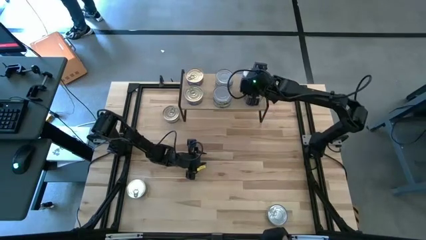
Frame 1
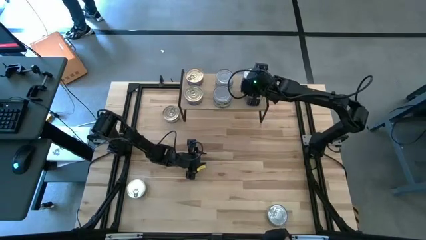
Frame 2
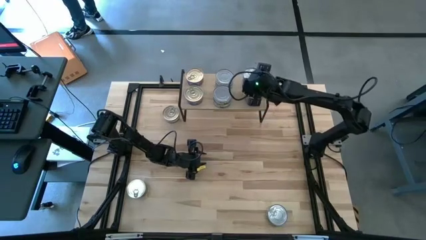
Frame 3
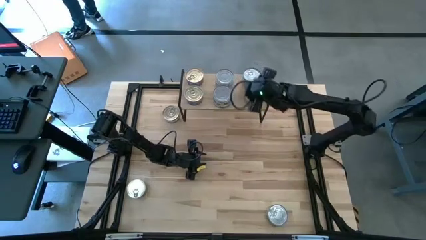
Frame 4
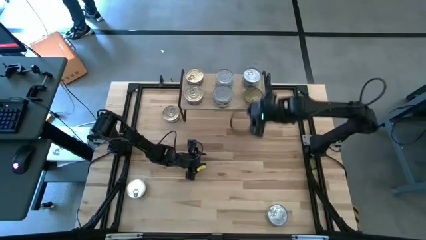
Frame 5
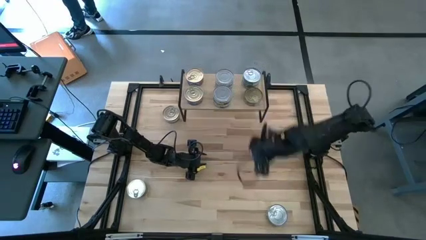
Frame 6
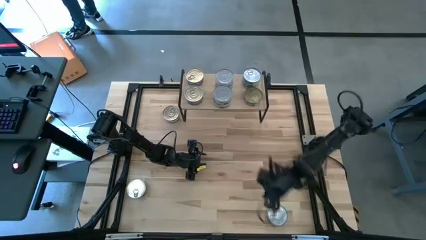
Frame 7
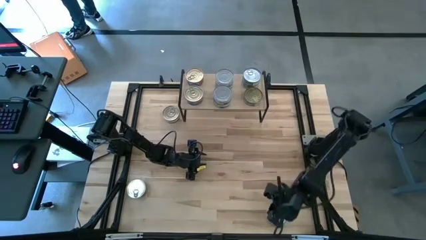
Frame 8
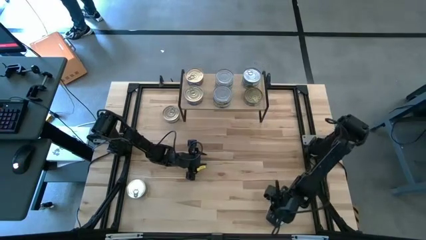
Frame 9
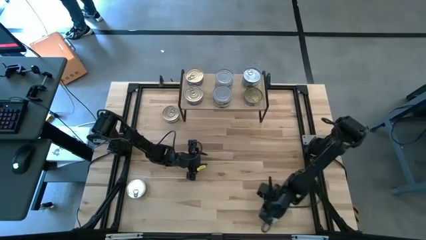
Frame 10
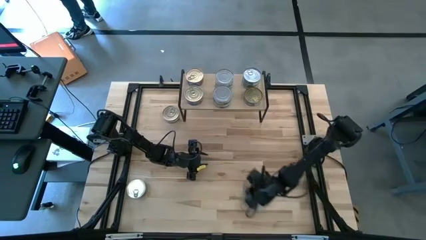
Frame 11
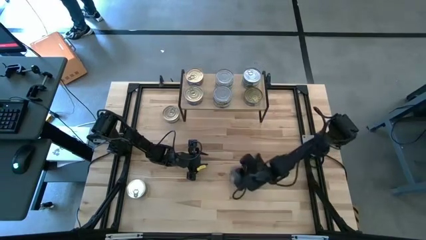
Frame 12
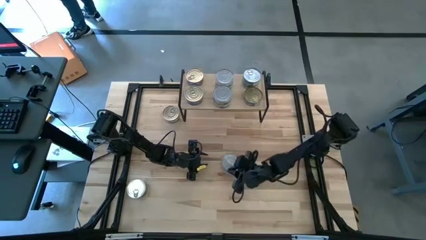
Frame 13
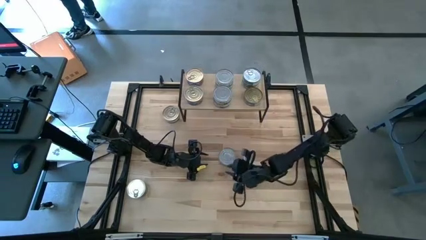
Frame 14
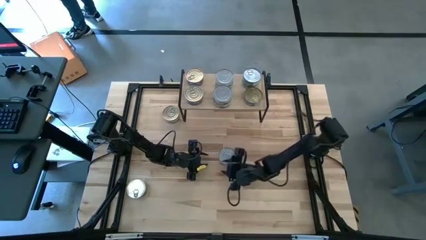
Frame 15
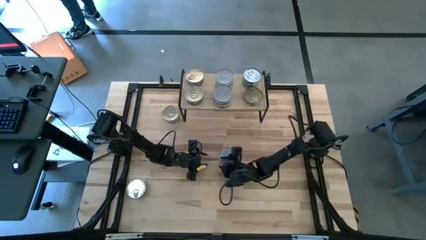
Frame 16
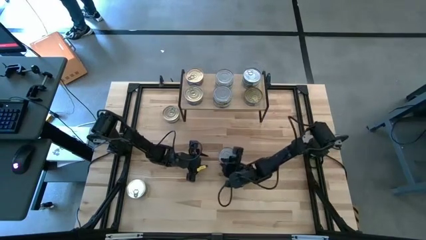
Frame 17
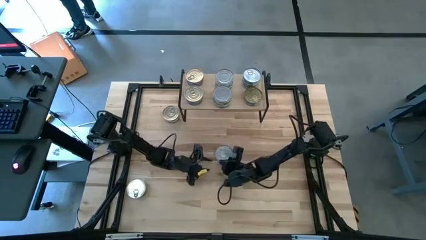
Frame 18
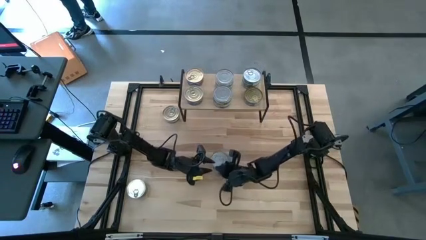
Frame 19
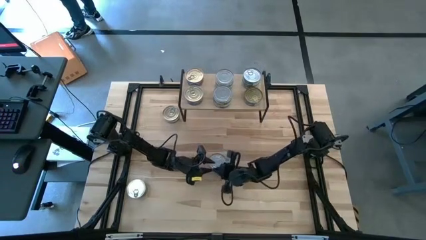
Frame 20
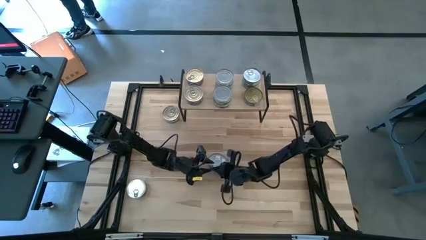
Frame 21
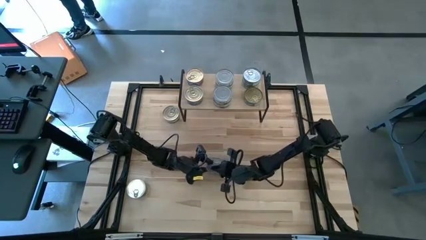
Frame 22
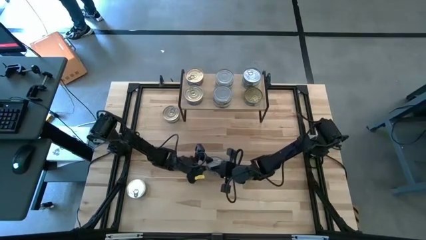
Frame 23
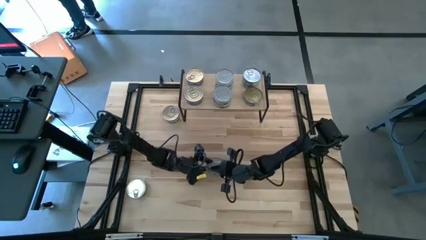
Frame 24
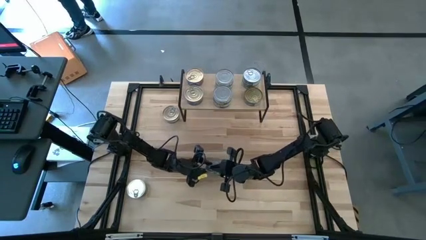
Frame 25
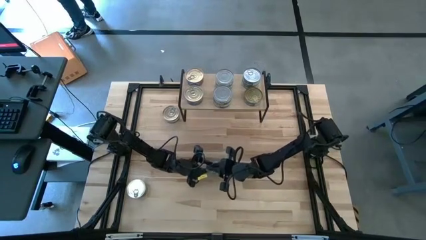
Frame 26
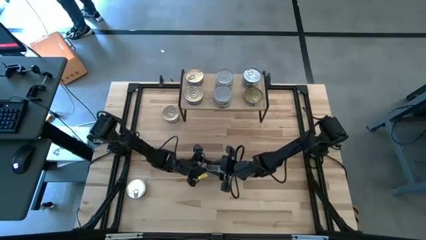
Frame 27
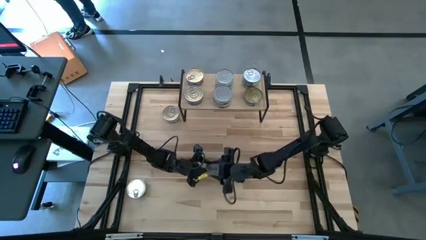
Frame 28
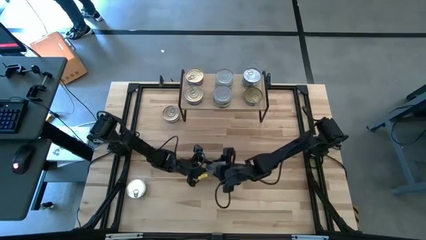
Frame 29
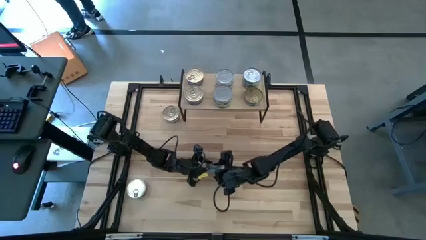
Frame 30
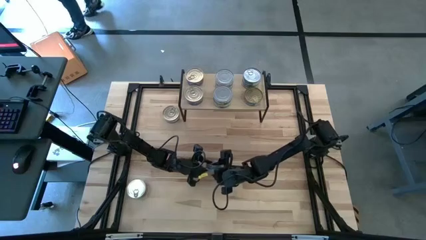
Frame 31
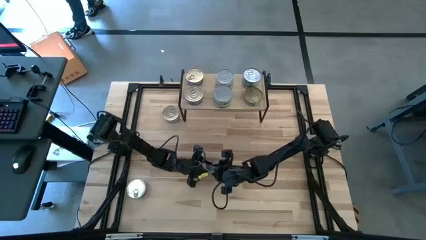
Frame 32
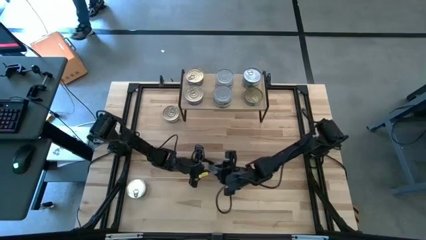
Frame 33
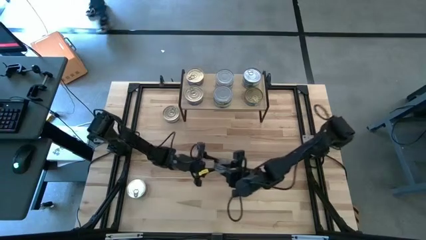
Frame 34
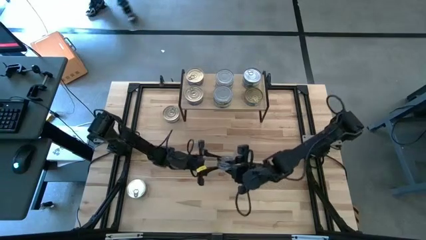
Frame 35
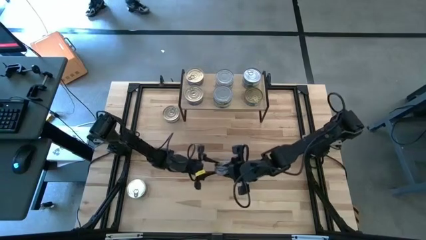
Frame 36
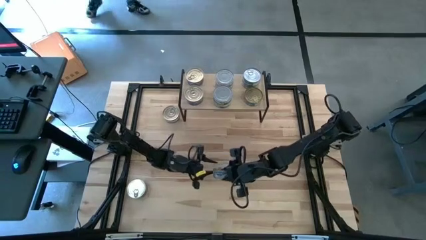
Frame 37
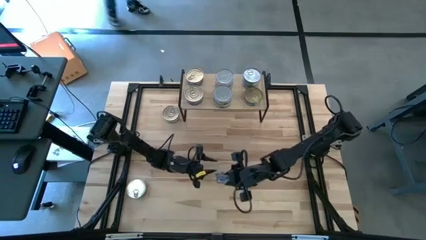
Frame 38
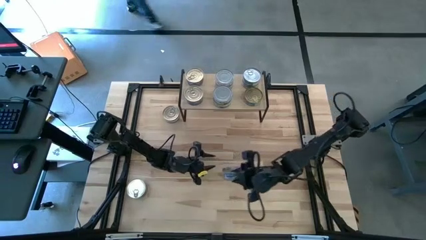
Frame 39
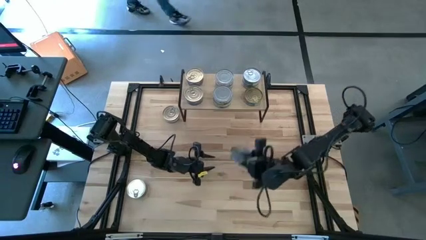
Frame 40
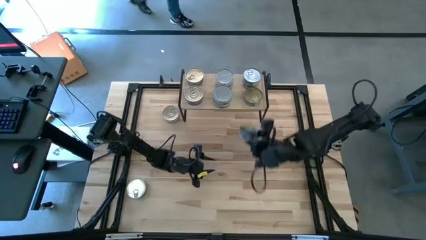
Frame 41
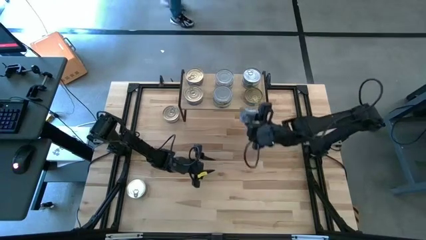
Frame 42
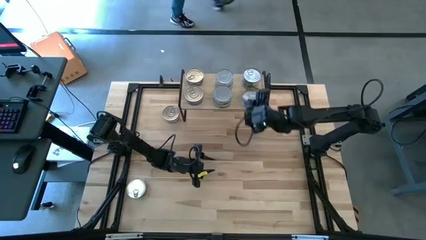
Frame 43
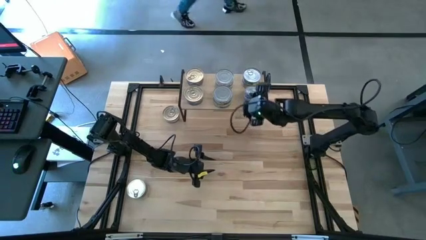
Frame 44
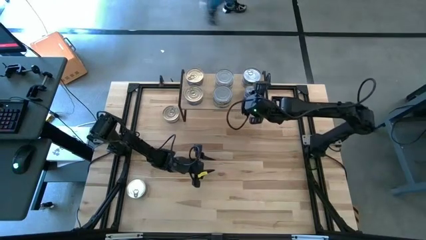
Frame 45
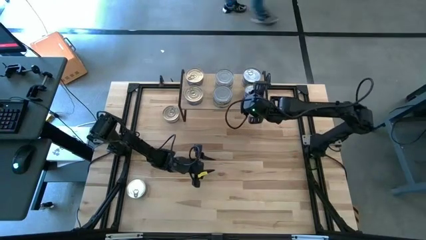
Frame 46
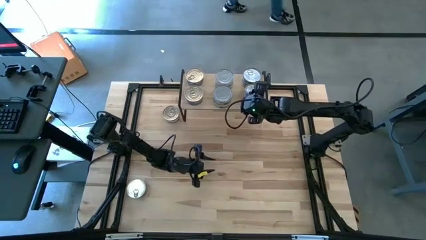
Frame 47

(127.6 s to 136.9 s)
Task: Stack canned seafood by type on shelf
Stack the green with blue patterned can on top of the green with blue patterned tuna can

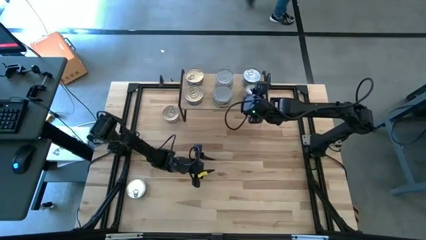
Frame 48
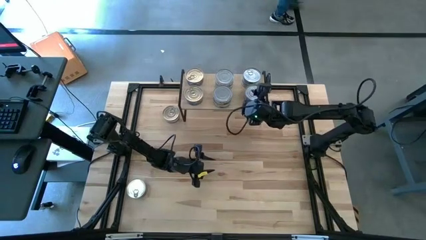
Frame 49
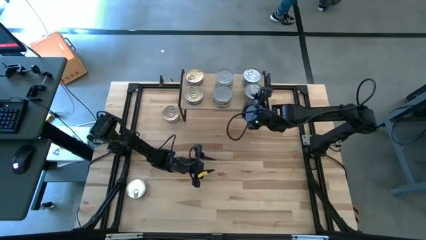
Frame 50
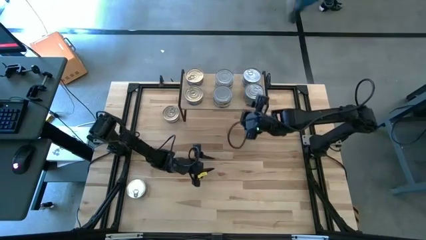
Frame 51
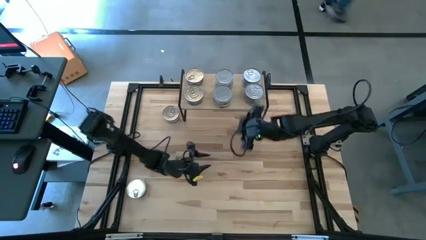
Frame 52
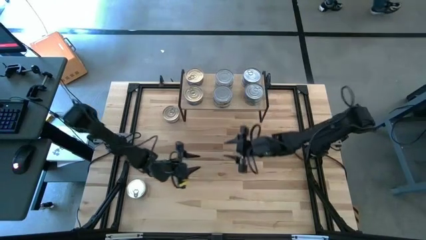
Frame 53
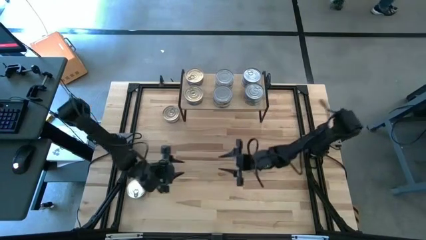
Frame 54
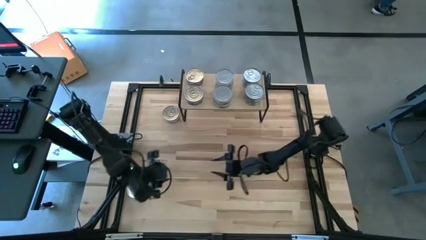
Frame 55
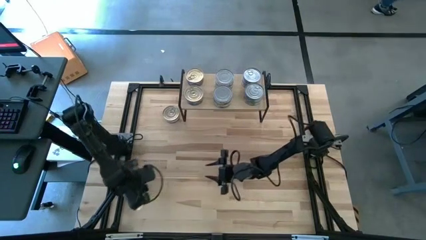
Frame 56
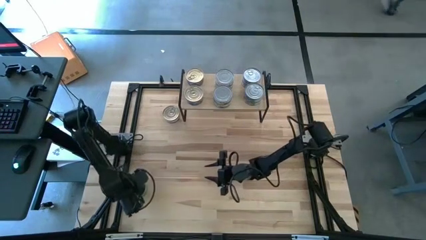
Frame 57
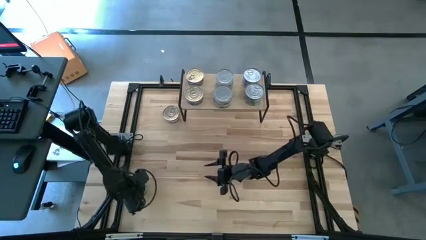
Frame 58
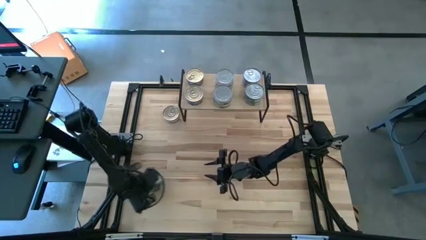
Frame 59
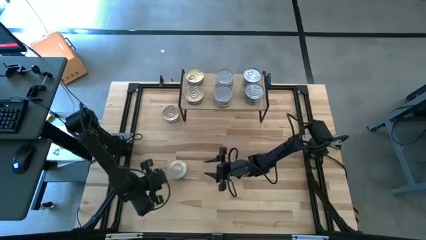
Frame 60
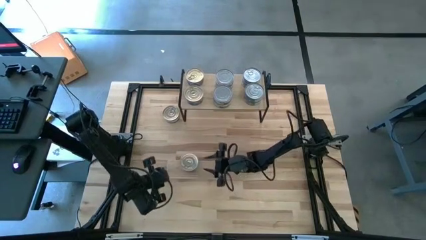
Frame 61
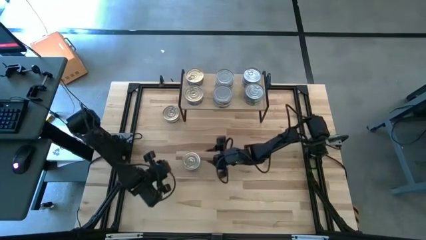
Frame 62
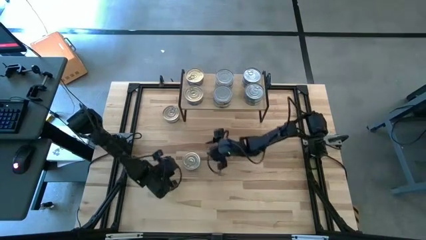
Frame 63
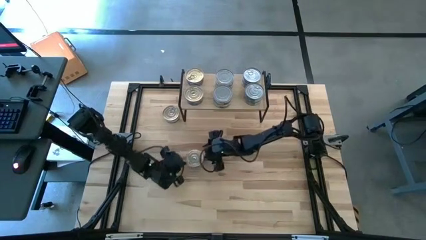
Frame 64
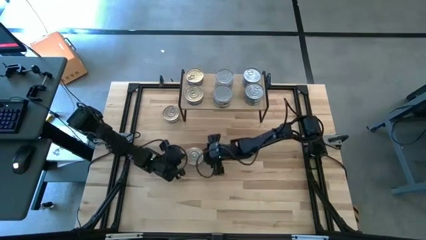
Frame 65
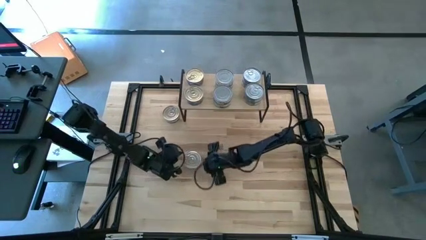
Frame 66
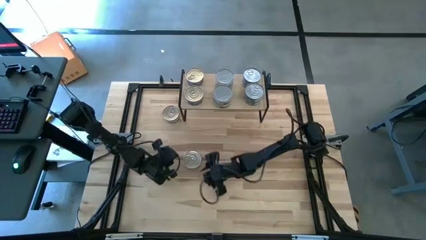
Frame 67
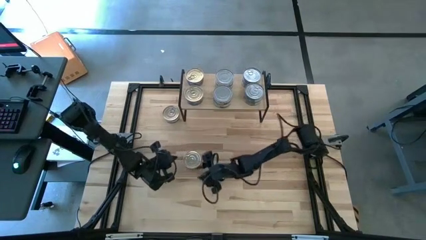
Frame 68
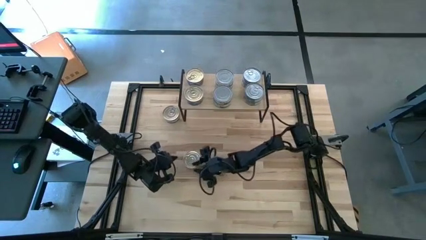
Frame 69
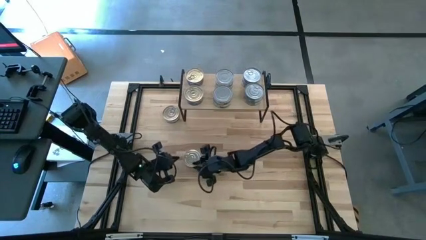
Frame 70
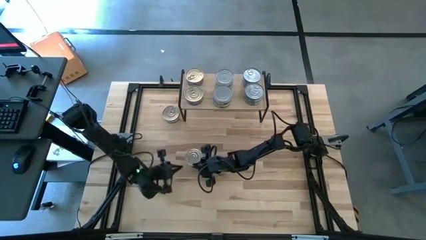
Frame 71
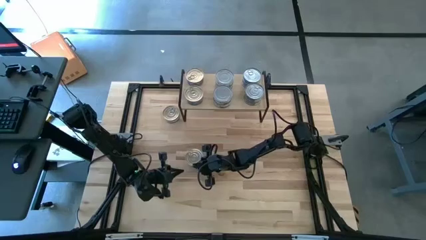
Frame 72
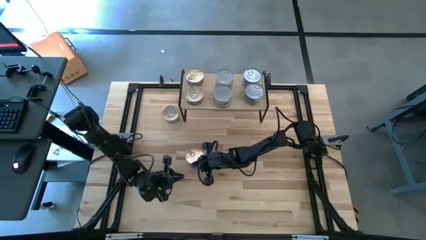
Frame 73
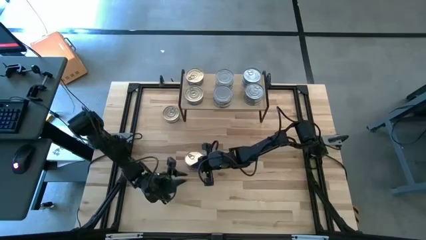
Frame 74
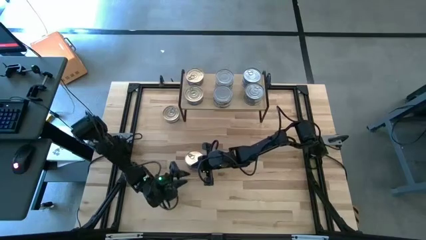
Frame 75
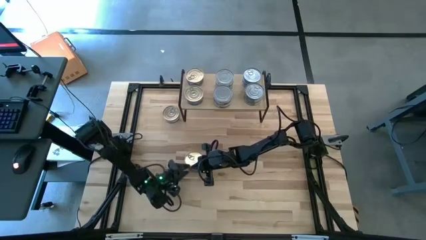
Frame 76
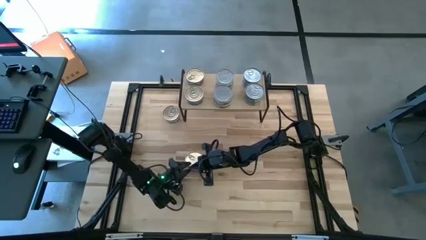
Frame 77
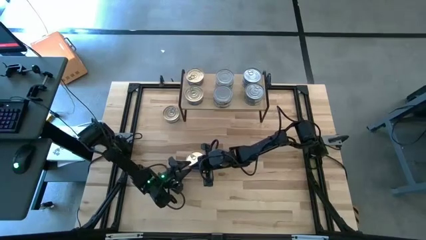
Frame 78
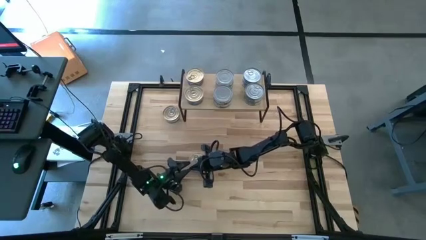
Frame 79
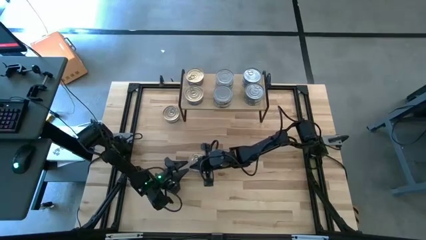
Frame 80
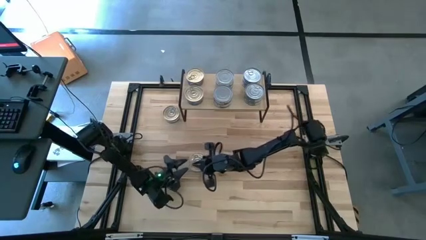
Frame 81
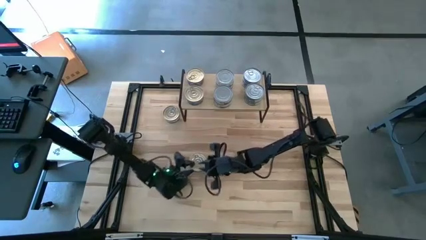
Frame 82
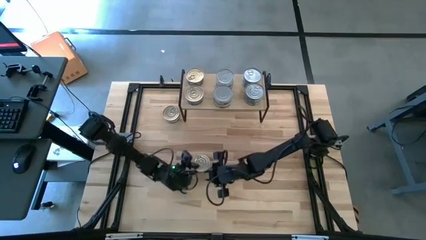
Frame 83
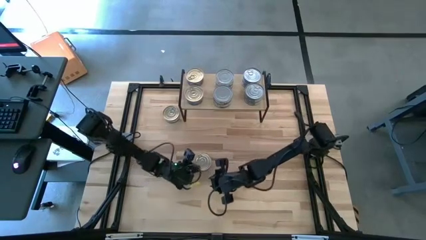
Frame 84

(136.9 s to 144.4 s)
Stack the blue tuna can on top of the other blue tuna can
